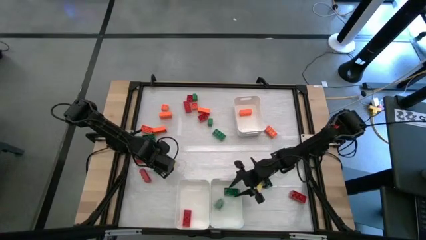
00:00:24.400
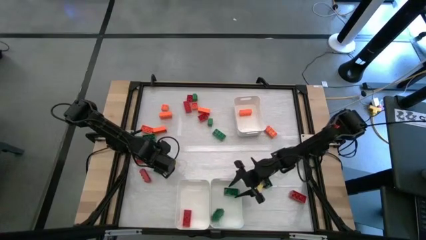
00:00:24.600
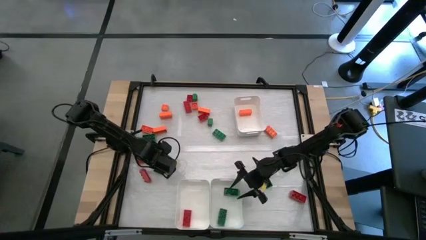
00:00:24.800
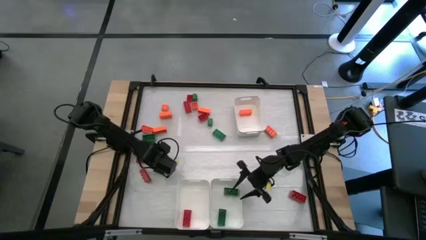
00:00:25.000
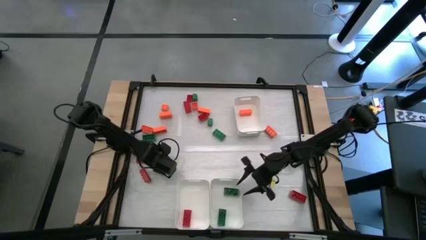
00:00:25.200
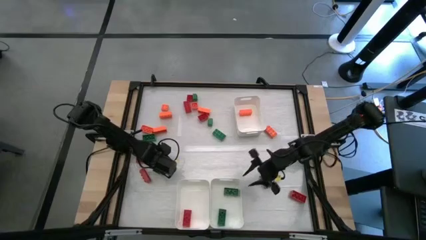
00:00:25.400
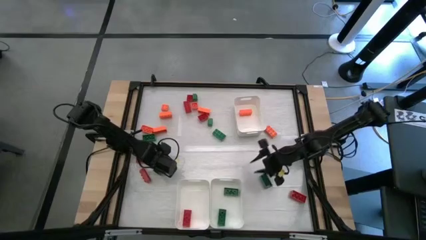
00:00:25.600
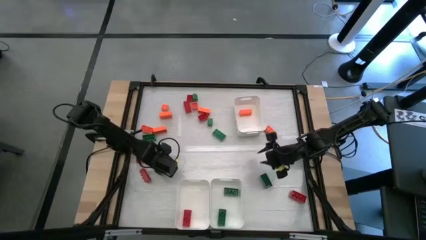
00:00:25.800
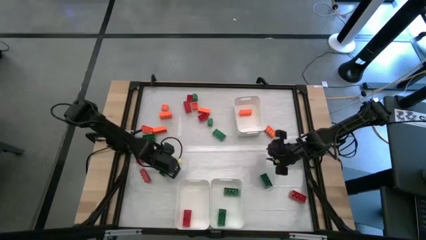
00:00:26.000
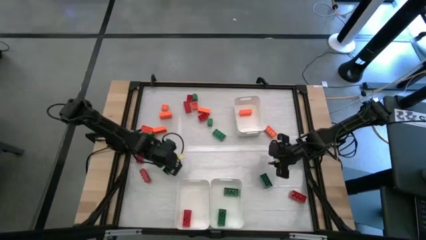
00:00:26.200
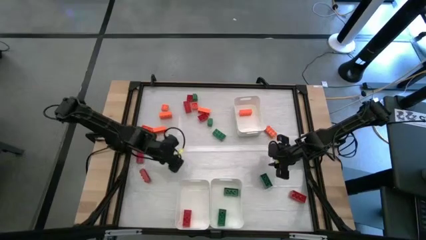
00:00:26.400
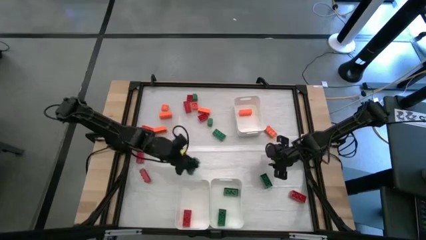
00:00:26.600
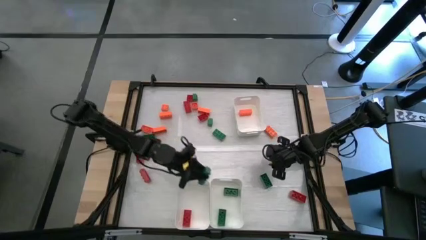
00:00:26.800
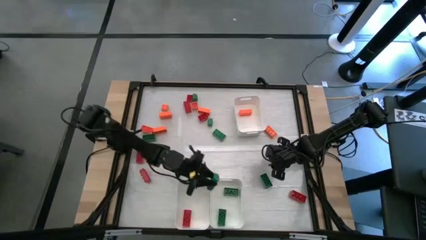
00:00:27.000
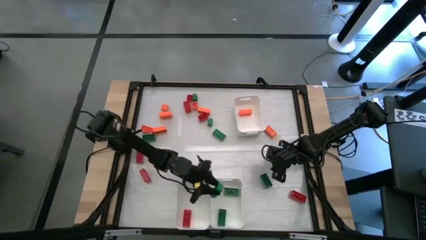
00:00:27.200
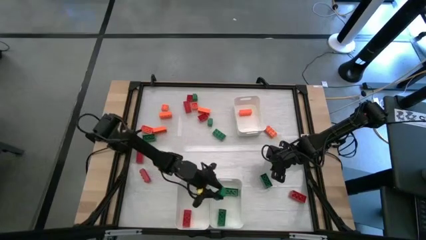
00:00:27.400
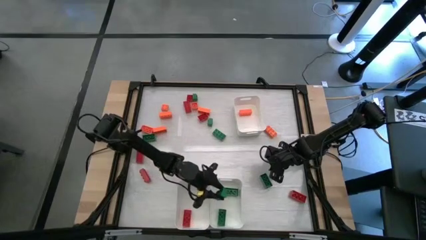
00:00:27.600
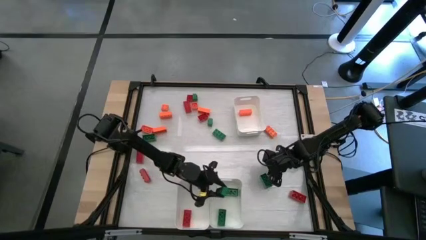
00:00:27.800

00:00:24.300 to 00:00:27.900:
Task: Sort blocks
Put the green game piece into the bottom right white bin

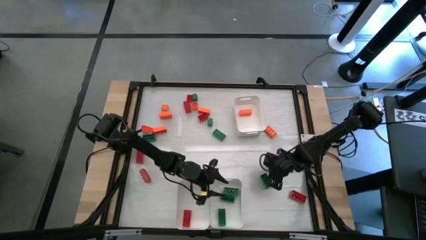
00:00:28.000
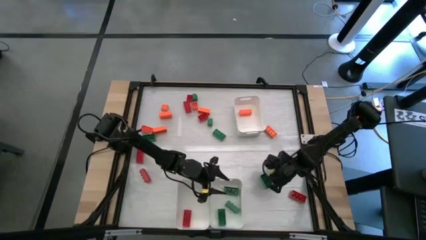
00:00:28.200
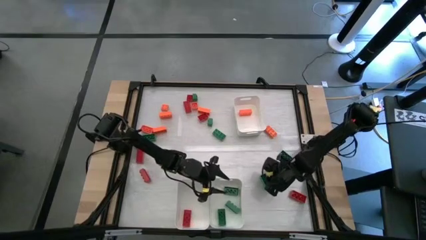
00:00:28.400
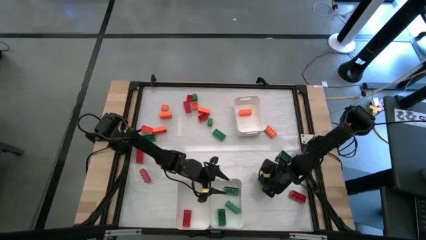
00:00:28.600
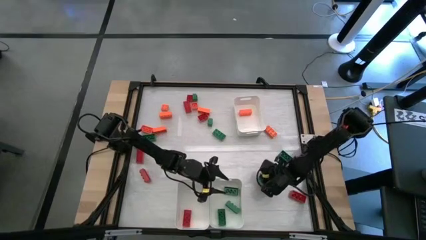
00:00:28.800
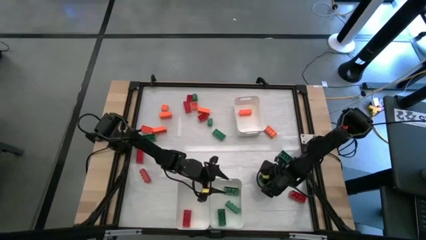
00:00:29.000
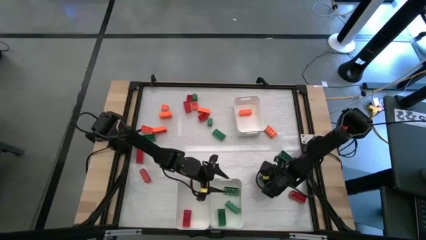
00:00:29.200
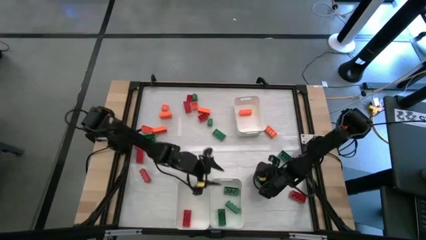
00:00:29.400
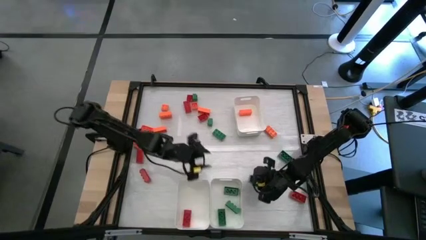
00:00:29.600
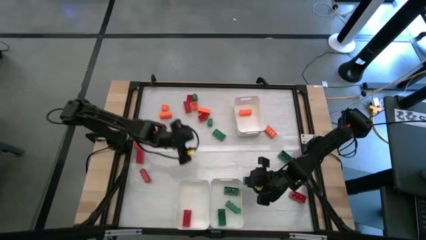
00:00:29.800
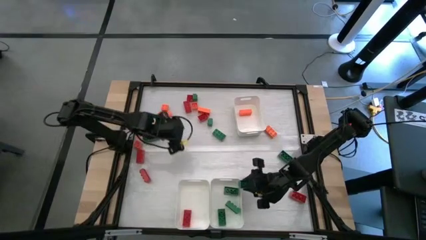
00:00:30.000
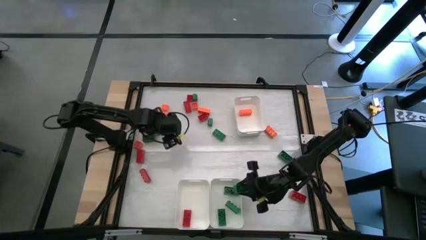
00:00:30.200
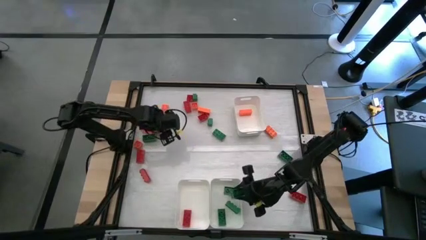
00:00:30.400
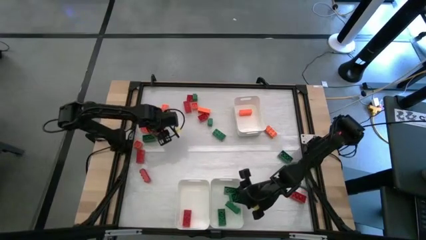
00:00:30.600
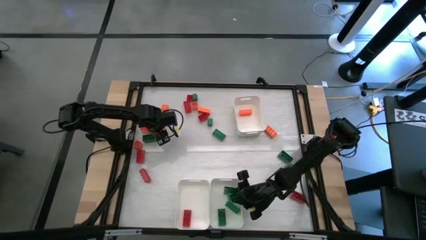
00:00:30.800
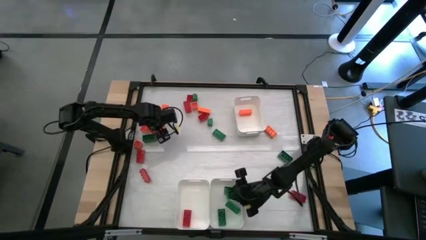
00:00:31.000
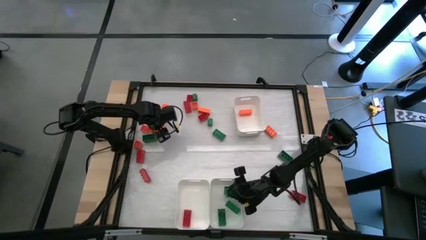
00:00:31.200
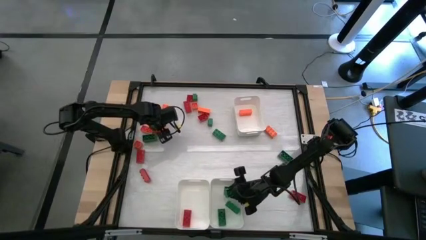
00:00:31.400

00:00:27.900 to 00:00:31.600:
Put the green game piece into the bottom right white bin

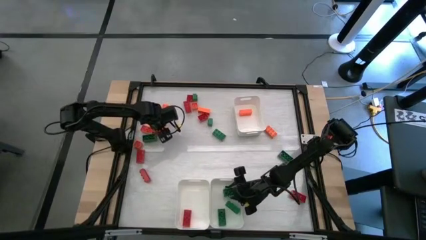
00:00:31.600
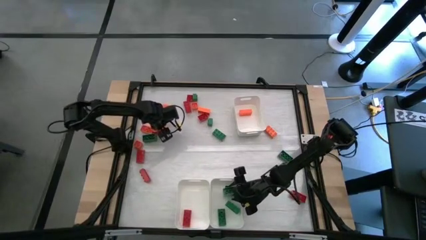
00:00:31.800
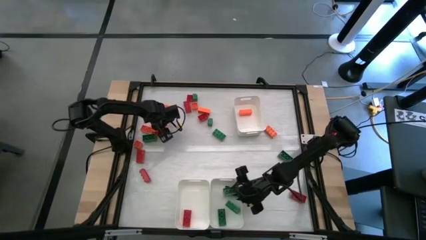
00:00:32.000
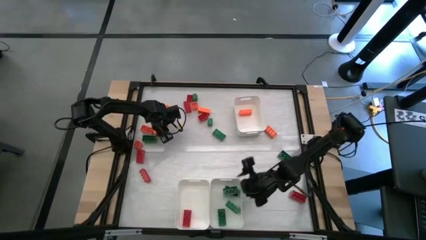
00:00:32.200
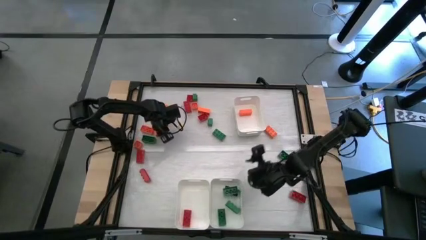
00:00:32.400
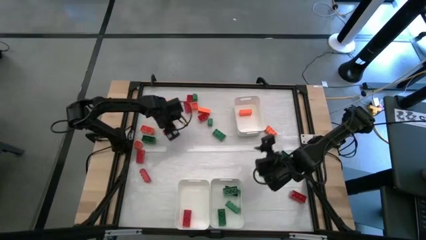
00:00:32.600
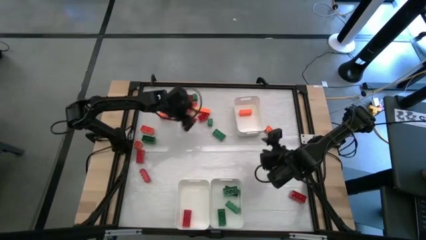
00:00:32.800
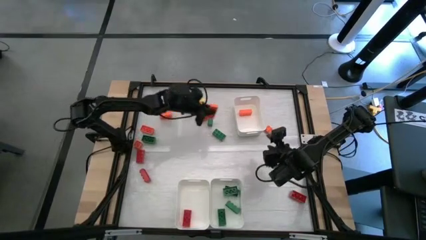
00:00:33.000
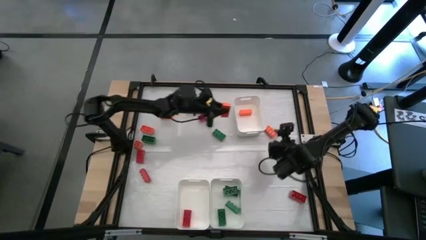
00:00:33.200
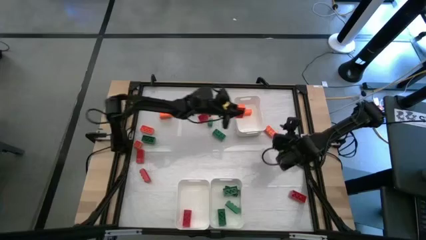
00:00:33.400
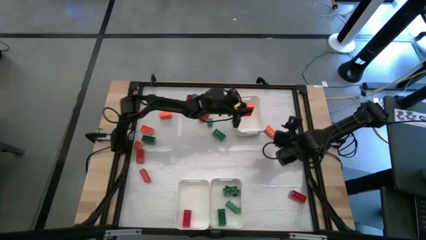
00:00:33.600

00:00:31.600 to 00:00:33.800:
Put the orange game piece into the top right white bin

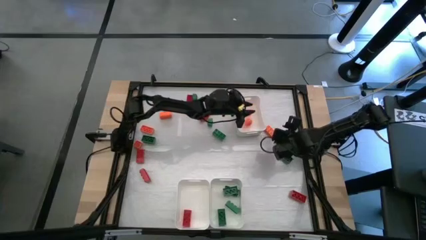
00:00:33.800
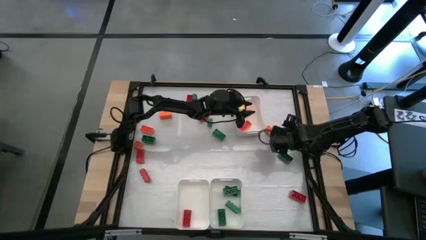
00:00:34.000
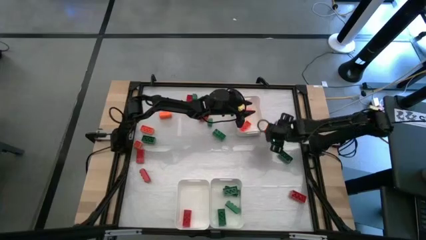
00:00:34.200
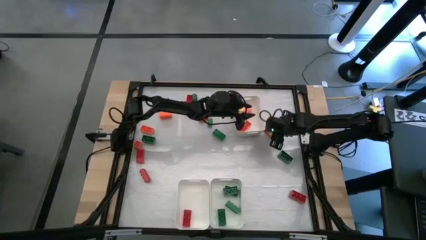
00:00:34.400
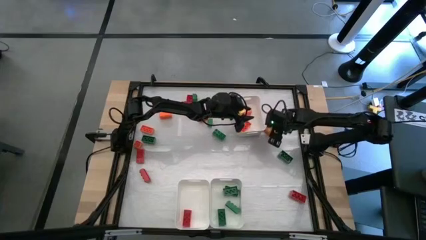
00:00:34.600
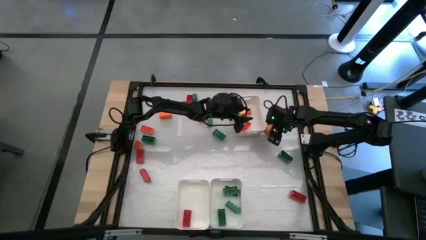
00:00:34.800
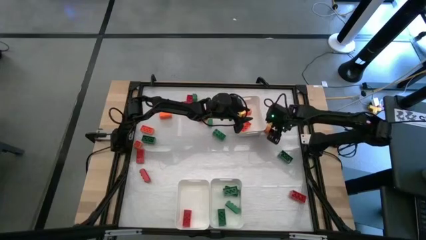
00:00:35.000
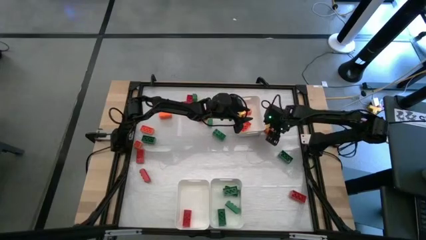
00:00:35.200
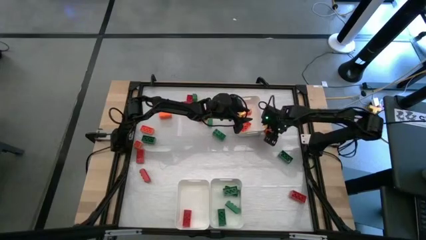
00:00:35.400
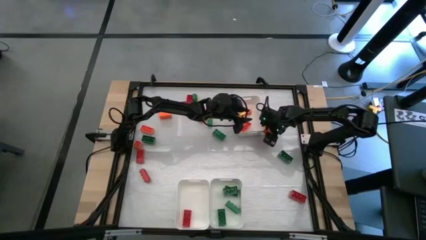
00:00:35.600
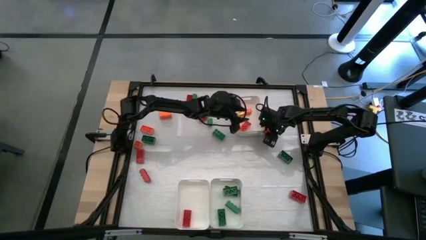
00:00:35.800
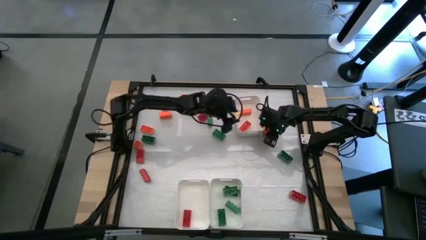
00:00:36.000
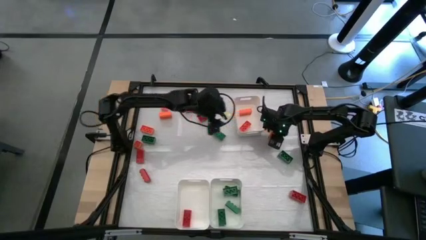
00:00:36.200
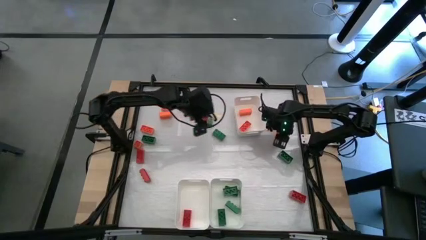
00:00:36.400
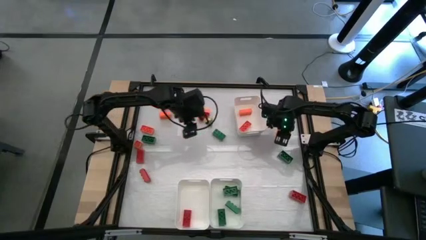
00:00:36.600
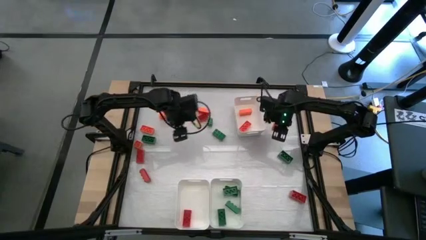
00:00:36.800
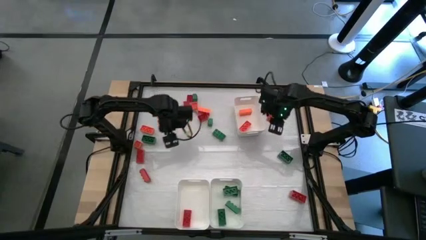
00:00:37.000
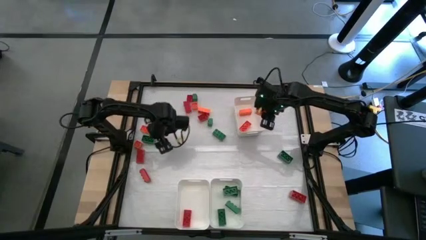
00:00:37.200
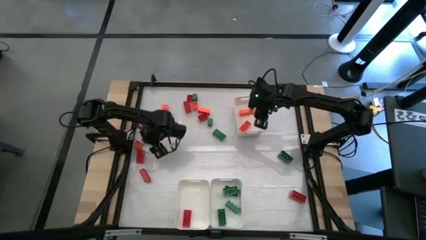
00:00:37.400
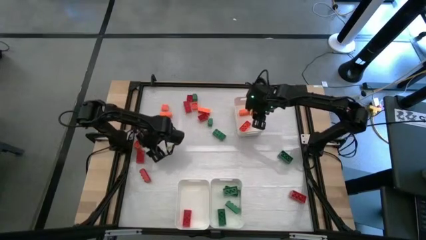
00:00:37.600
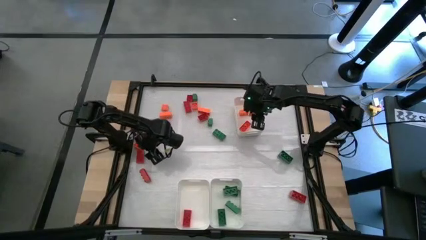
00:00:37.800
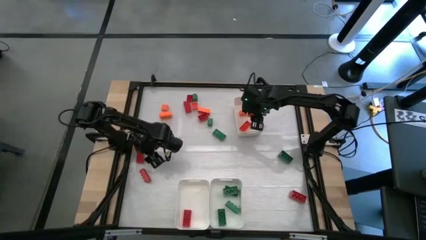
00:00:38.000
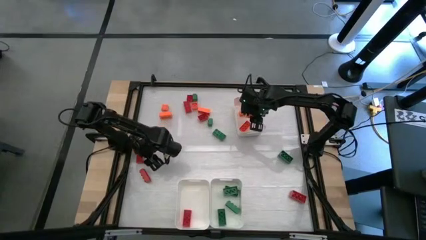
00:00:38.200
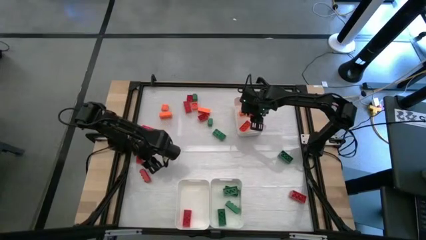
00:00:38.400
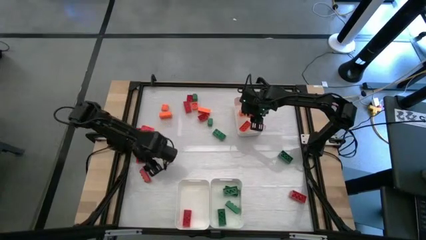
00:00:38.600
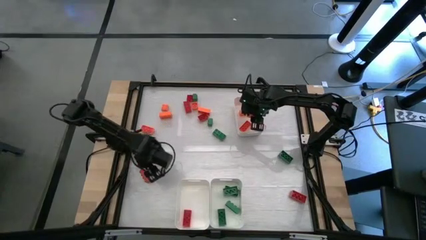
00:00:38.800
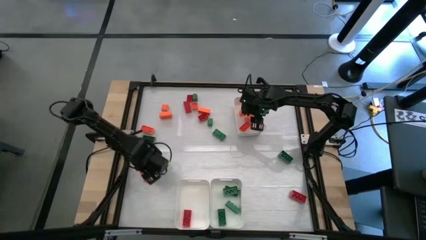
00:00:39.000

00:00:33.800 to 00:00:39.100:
Put the orange game piece into the top right white bin

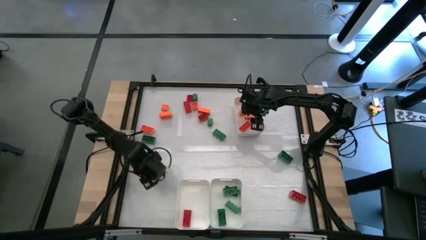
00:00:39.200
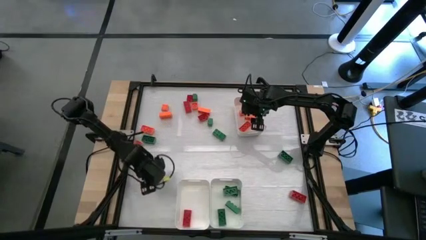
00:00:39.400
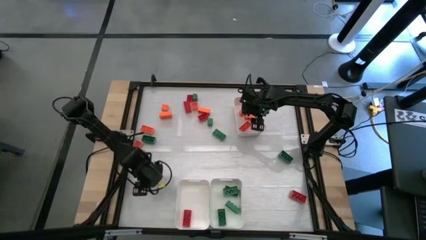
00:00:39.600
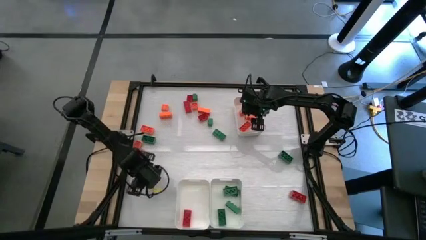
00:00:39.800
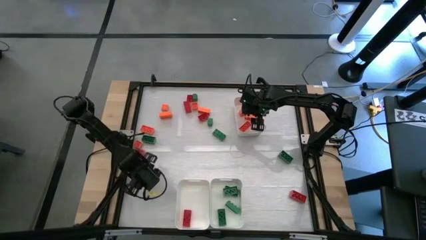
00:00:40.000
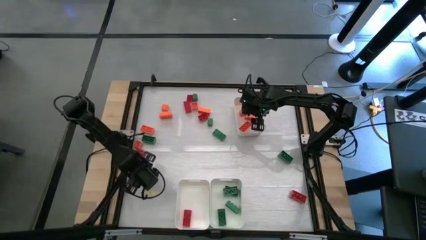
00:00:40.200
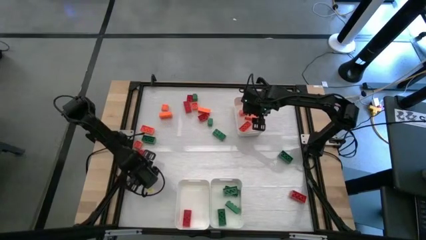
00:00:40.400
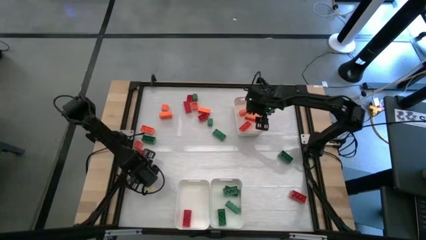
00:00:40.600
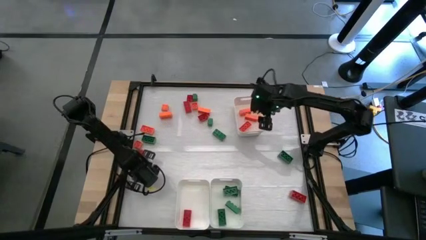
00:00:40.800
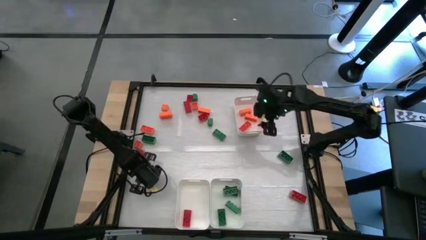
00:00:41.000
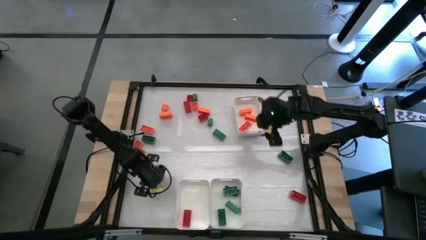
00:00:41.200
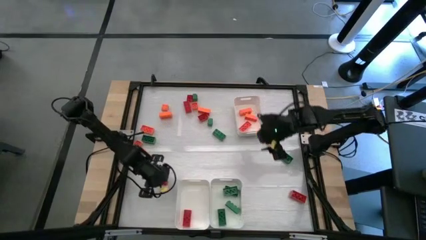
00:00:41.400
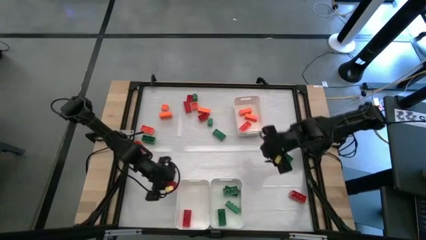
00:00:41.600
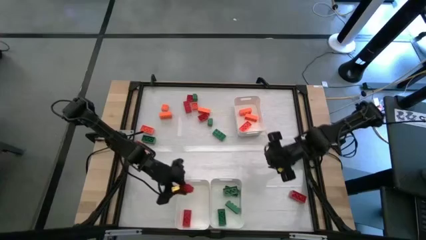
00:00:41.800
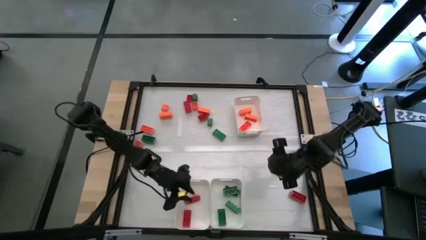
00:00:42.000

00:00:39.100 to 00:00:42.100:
Put the orange game piece into the top right white bin
